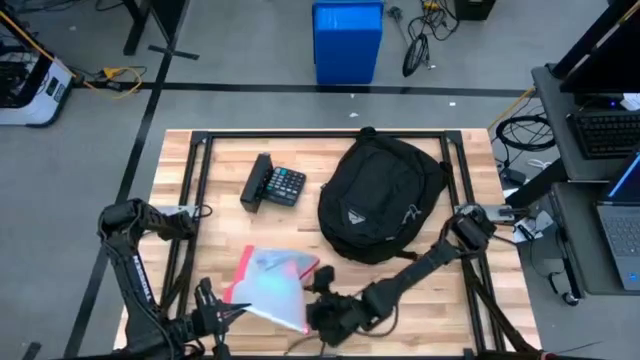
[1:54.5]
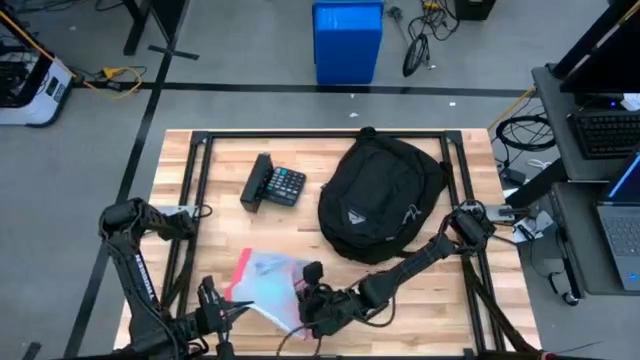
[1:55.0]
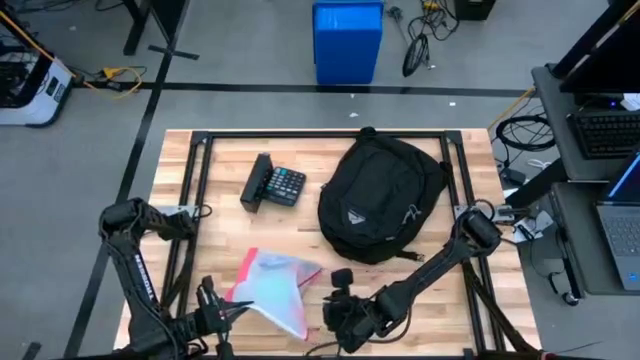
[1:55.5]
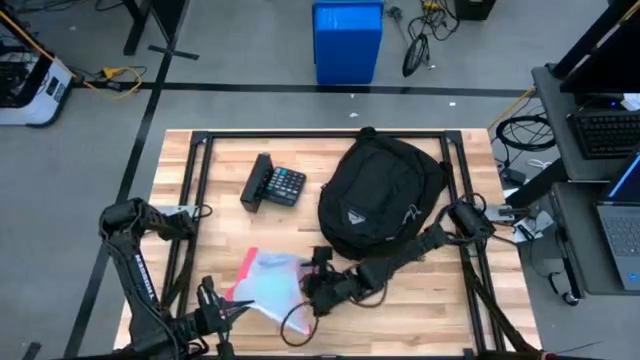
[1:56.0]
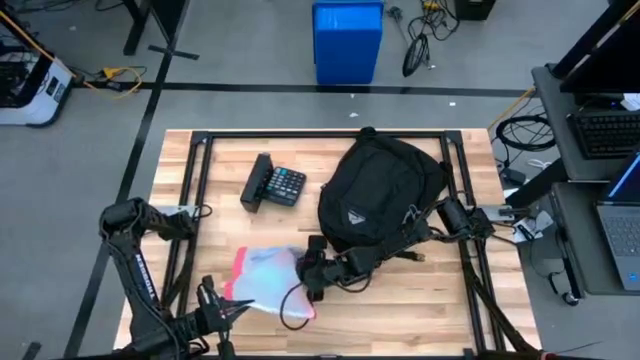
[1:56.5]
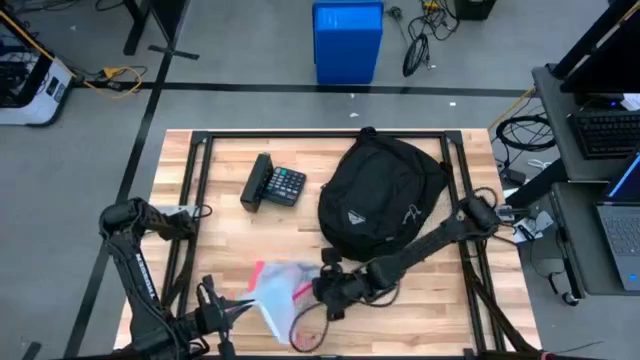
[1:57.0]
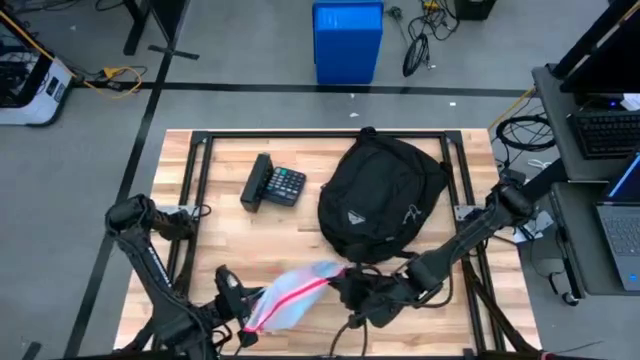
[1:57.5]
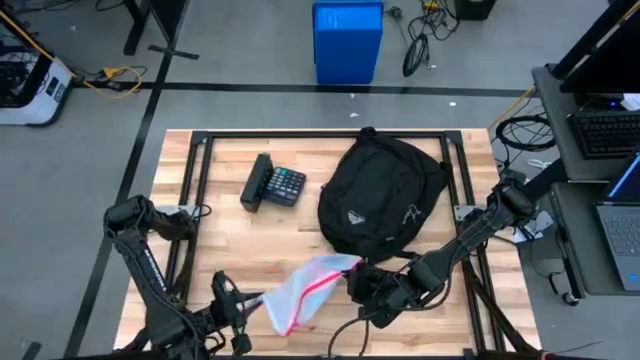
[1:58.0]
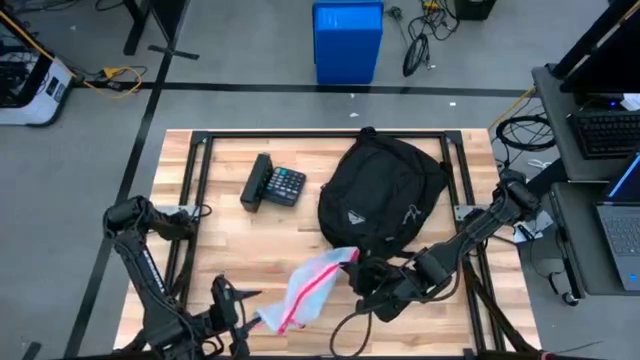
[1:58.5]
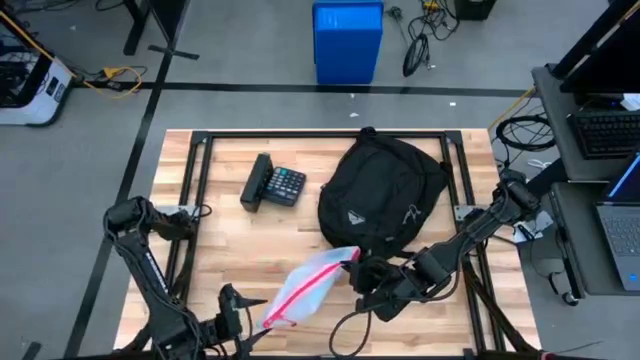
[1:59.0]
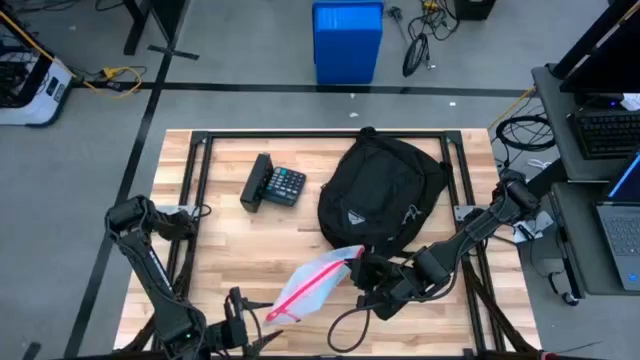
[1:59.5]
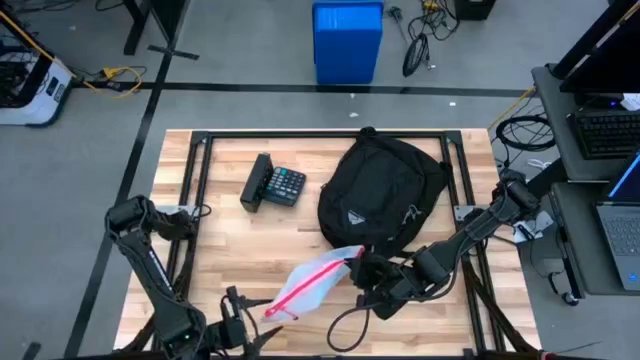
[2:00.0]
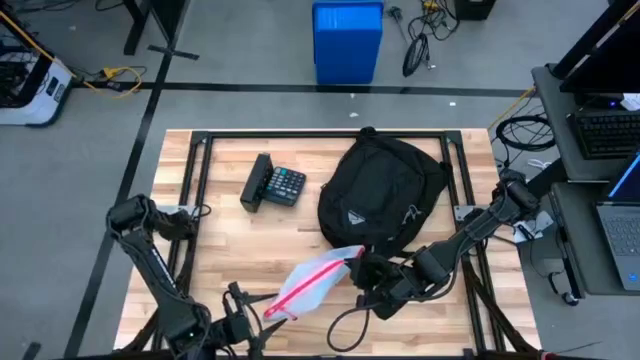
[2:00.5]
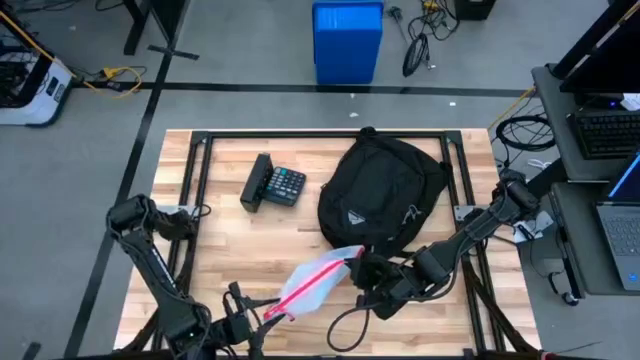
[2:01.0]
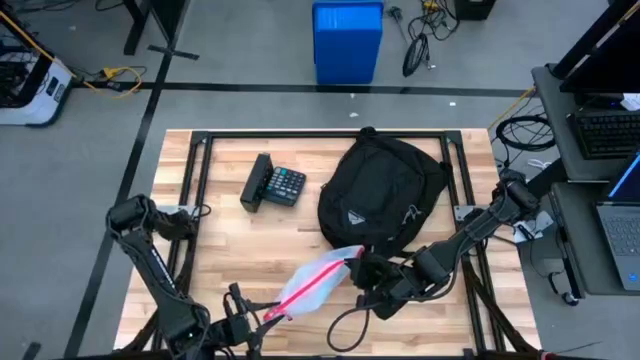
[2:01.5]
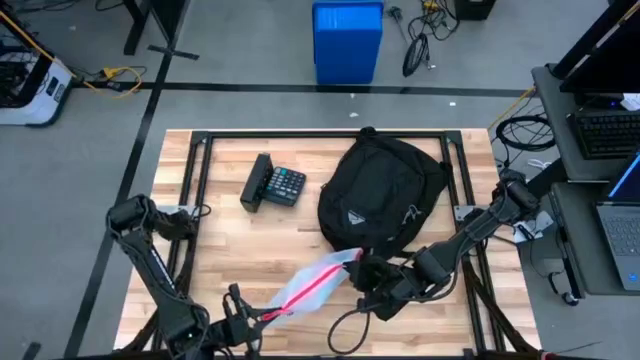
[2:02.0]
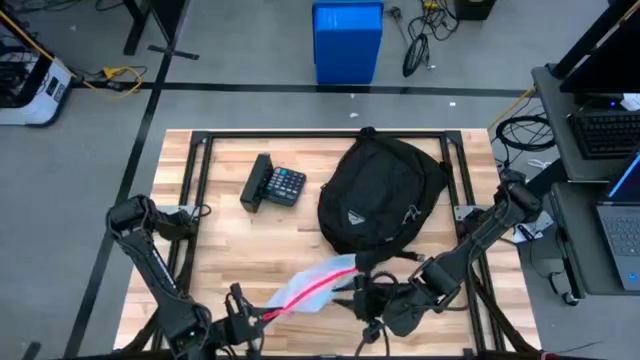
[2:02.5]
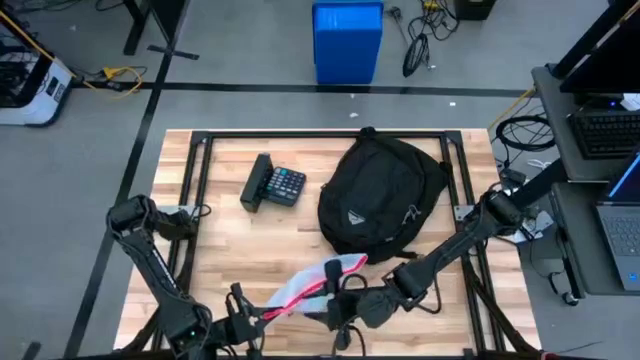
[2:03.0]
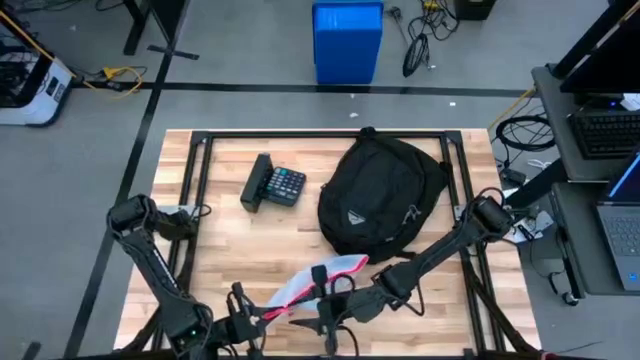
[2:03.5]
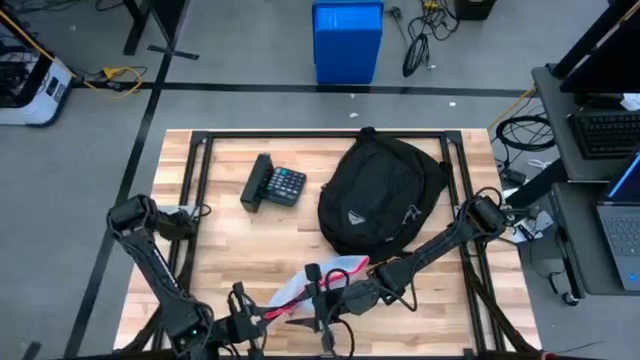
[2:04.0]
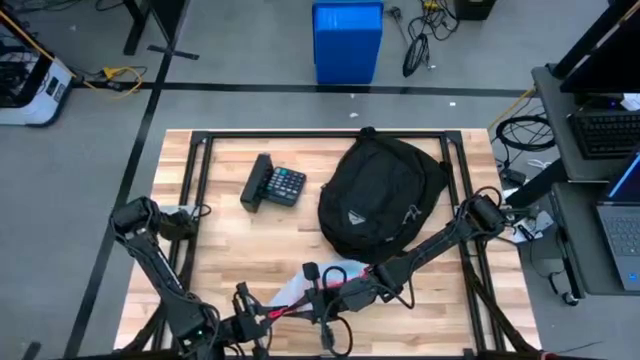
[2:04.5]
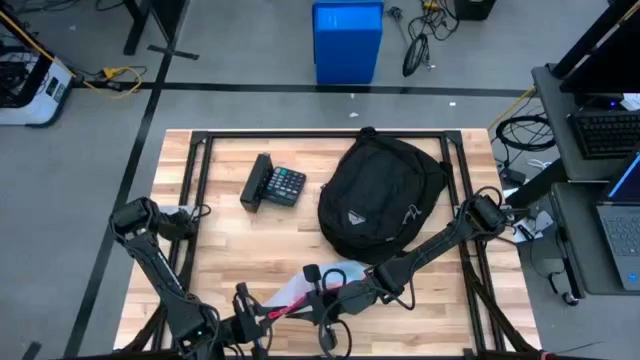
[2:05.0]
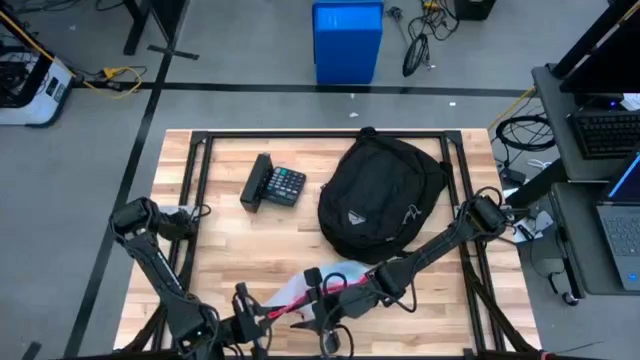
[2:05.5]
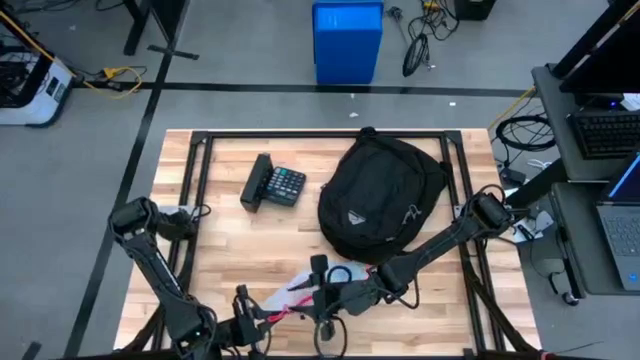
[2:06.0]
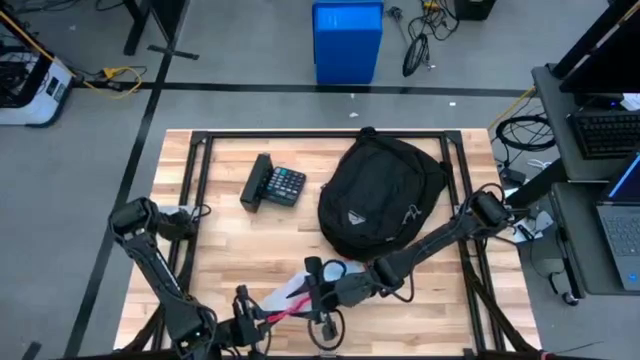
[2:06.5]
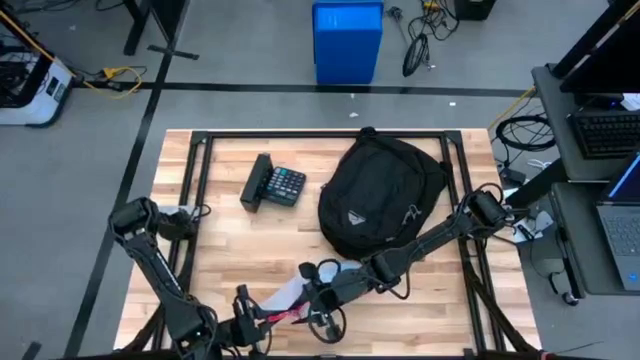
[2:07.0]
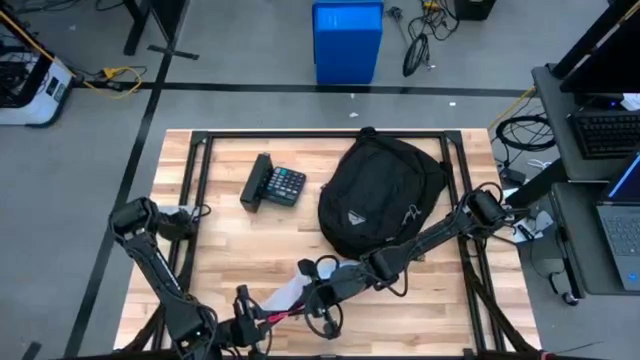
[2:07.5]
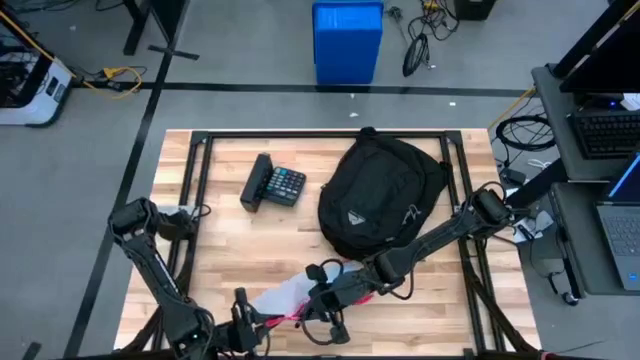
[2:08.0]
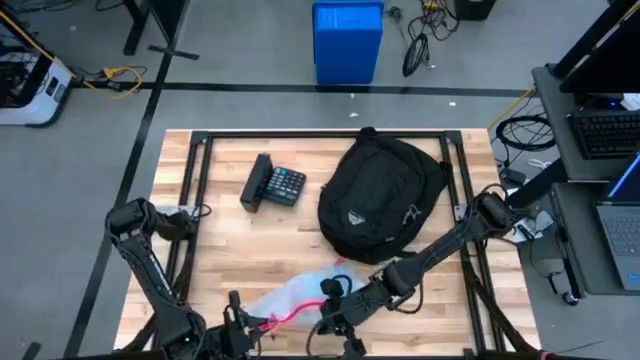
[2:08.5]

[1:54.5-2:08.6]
Task: Unpack backpack
Open the white zip bag

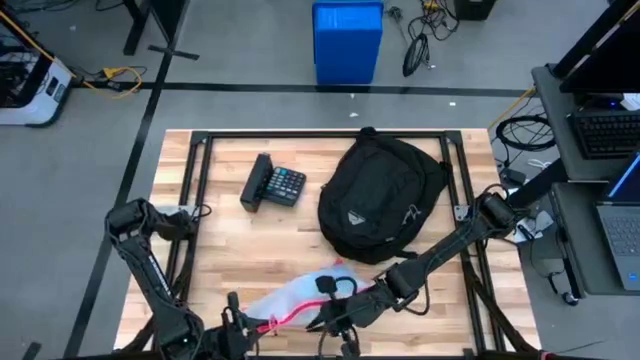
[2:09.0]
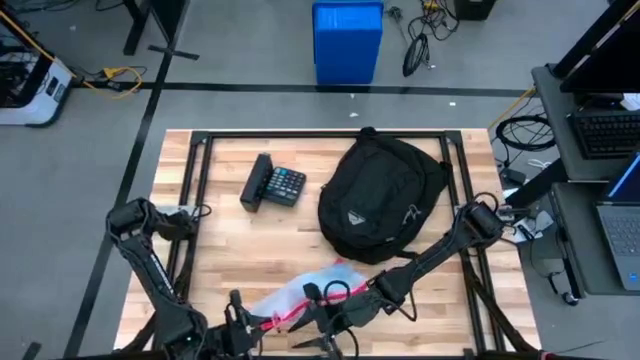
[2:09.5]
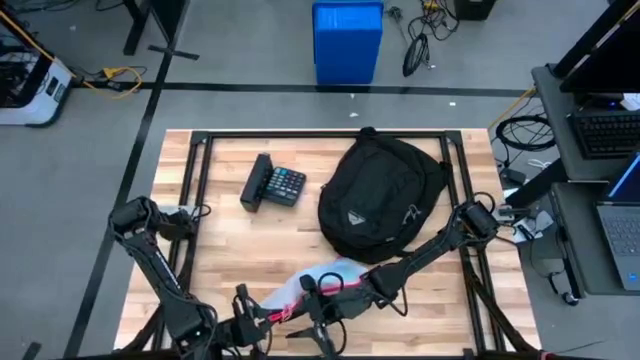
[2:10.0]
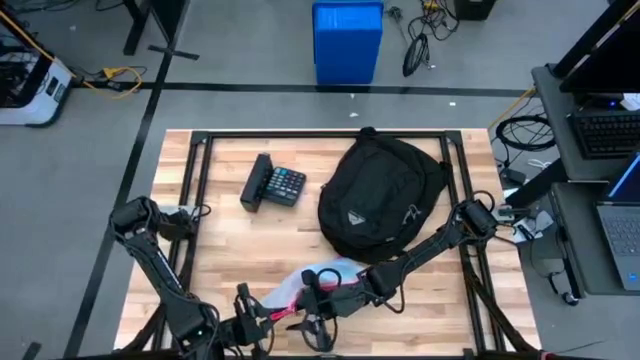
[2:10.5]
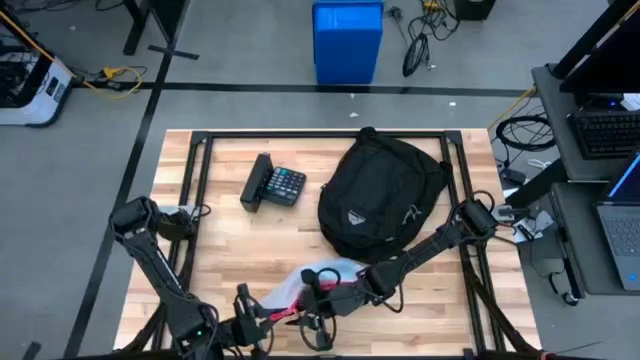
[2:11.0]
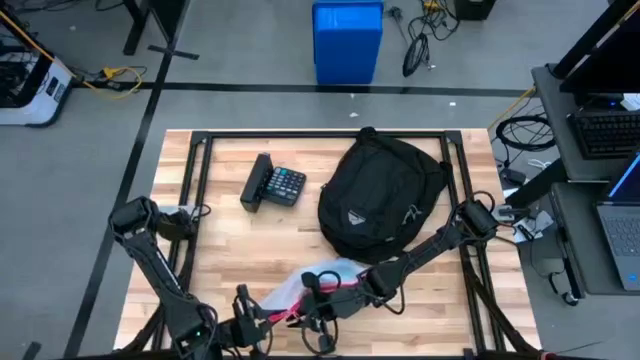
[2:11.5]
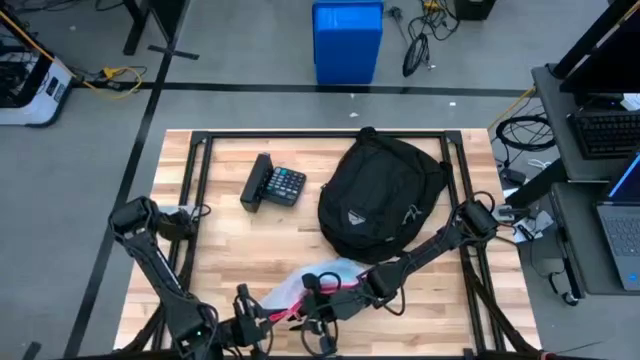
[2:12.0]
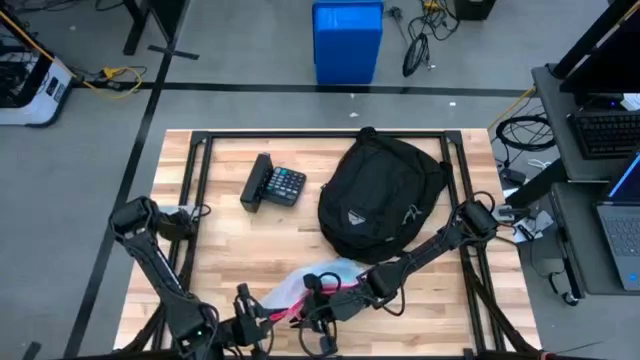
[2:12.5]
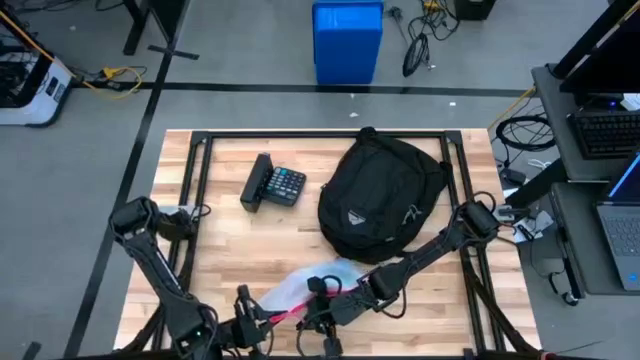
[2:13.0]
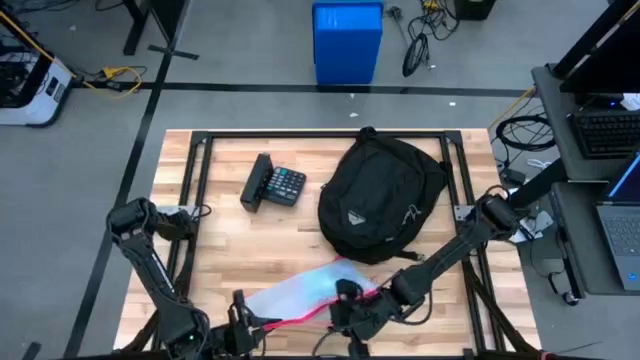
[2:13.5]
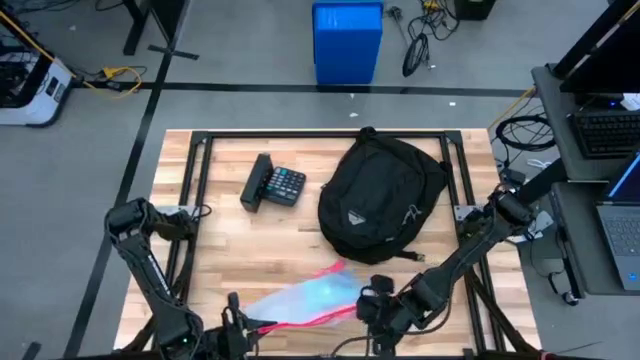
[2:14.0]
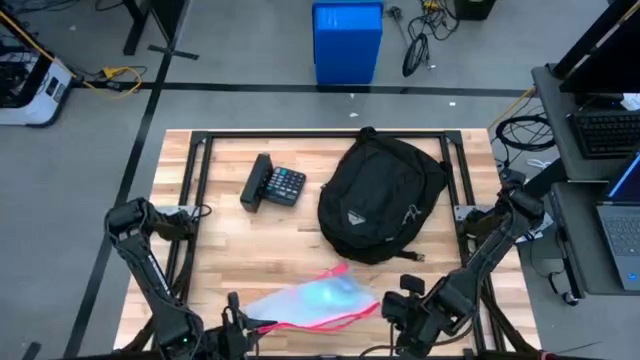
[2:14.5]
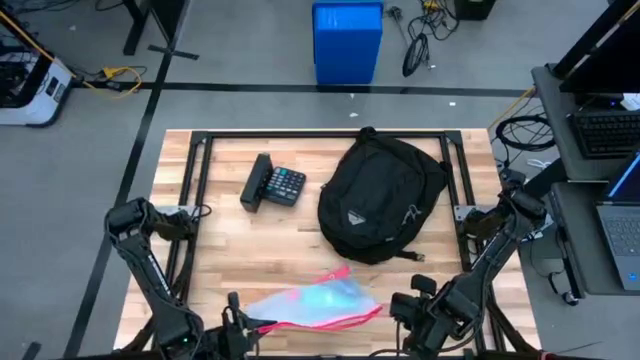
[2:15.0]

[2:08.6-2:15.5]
Open the white zip bag

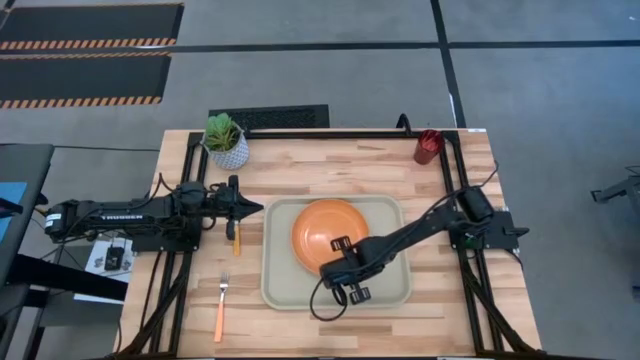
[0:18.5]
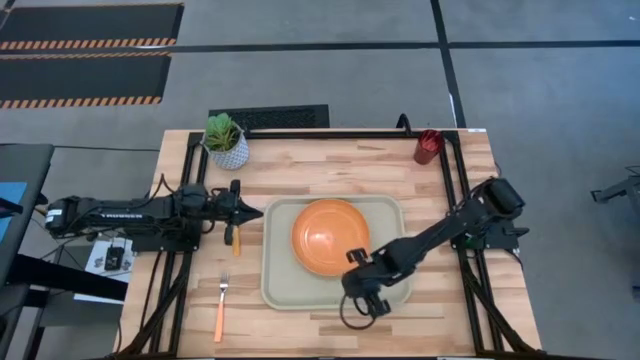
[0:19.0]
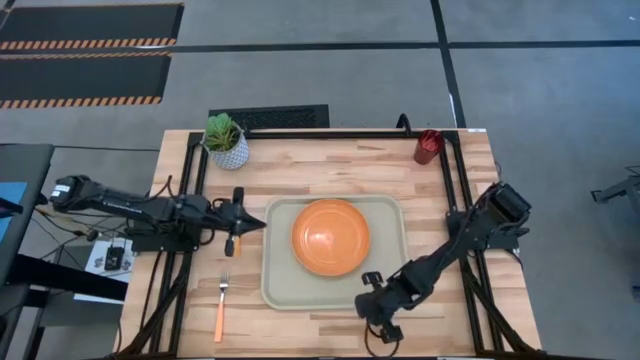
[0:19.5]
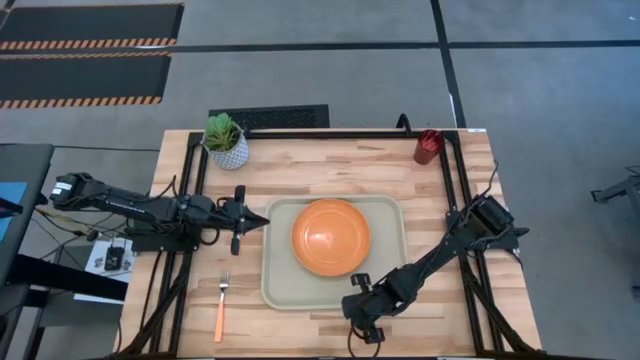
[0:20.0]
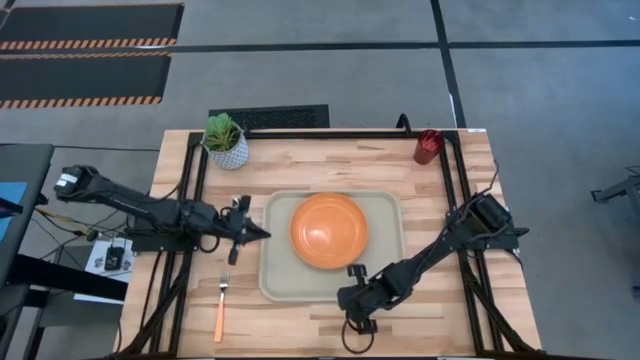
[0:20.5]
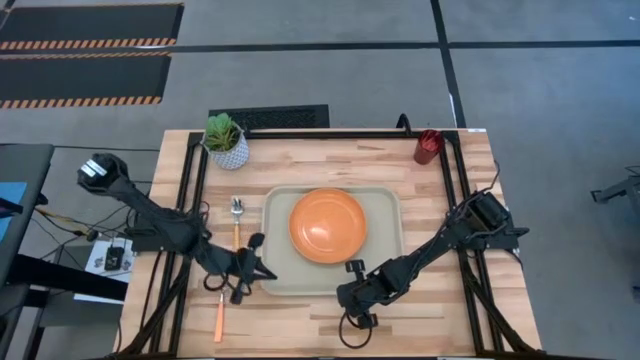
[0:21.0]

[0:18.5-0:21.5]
Task: Pick and place plate/cup/fork/spoon on tray
Adjust the gray serving tray
